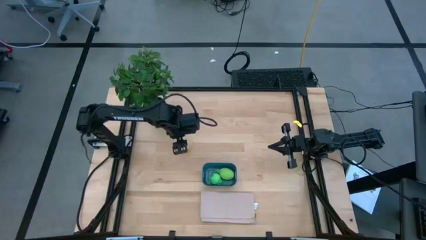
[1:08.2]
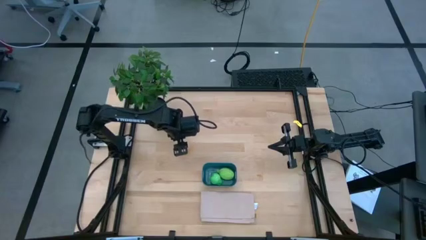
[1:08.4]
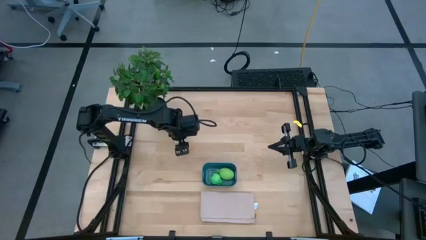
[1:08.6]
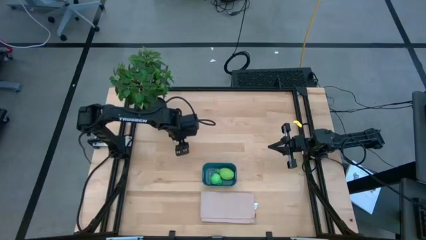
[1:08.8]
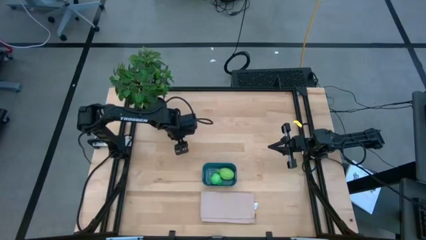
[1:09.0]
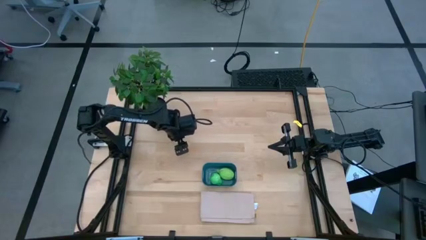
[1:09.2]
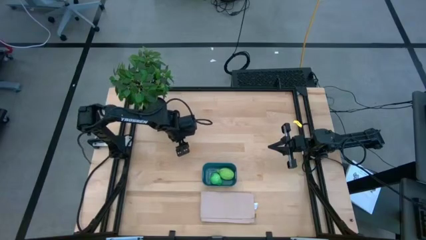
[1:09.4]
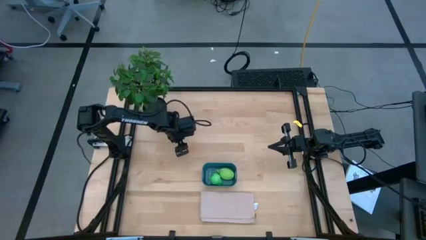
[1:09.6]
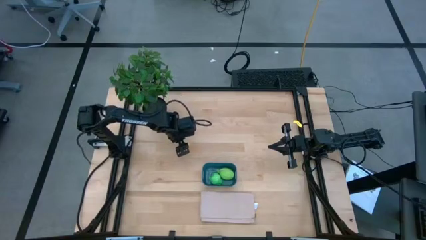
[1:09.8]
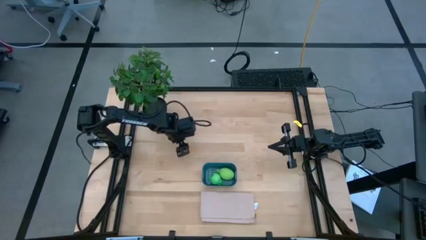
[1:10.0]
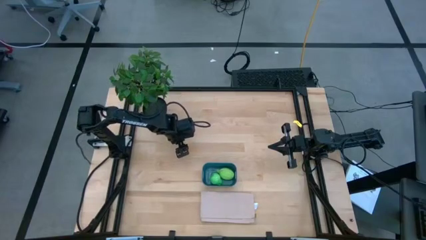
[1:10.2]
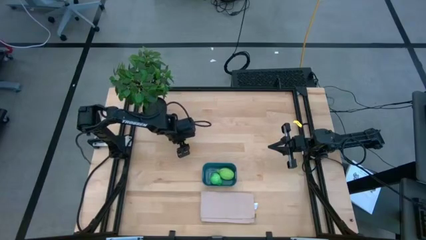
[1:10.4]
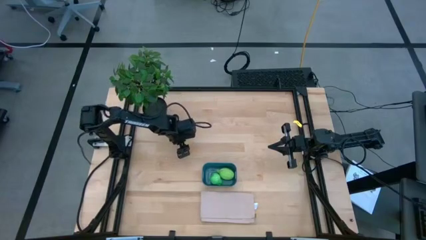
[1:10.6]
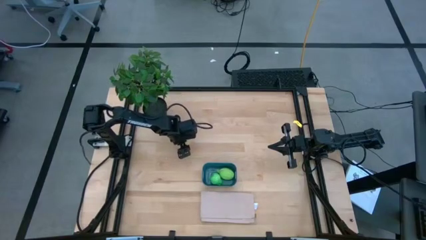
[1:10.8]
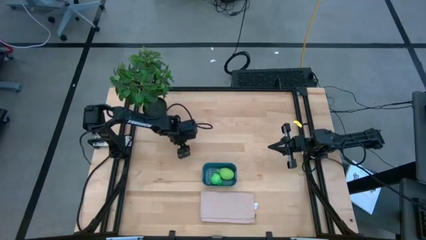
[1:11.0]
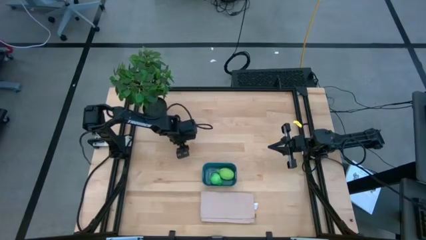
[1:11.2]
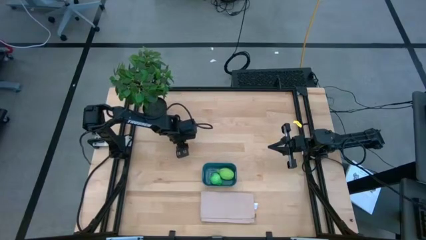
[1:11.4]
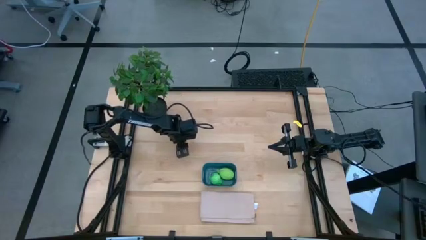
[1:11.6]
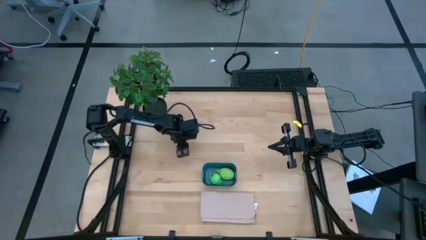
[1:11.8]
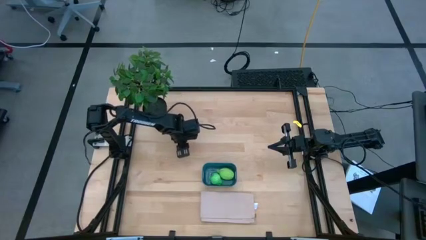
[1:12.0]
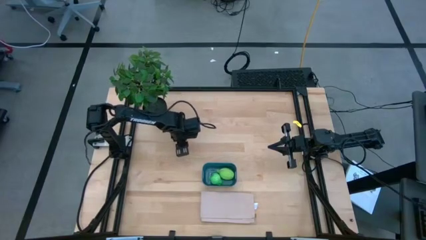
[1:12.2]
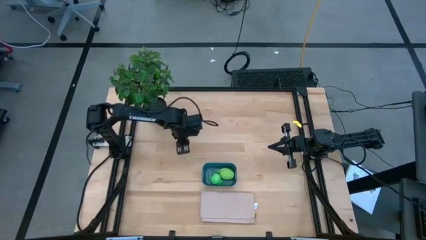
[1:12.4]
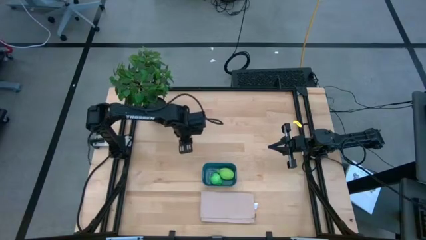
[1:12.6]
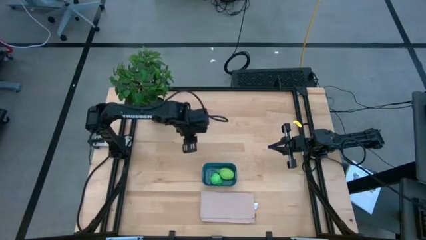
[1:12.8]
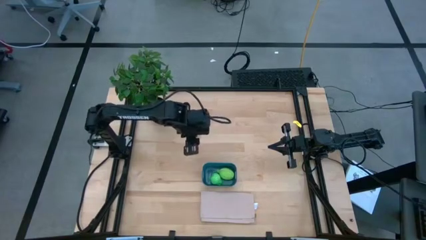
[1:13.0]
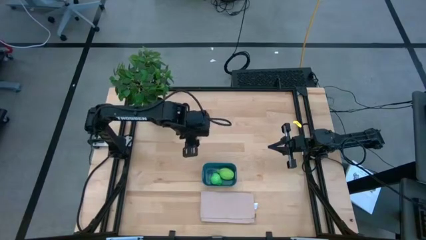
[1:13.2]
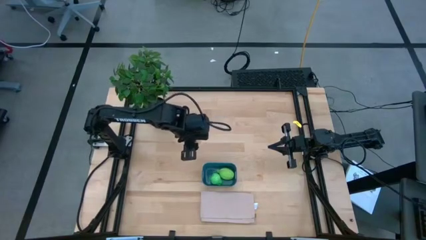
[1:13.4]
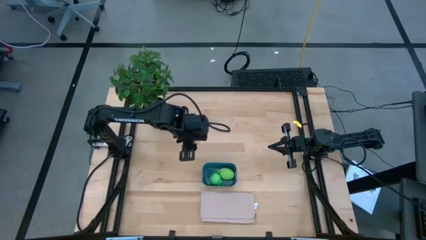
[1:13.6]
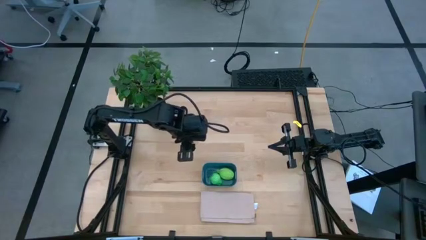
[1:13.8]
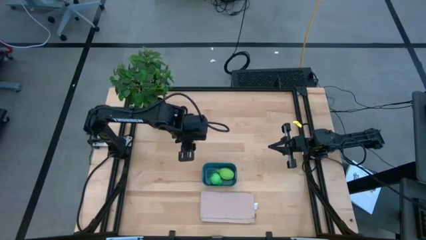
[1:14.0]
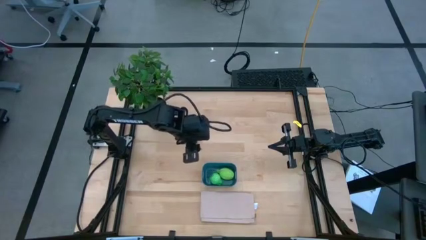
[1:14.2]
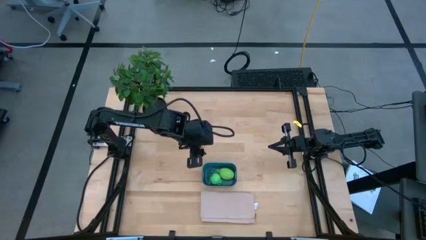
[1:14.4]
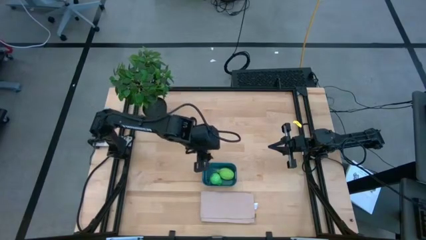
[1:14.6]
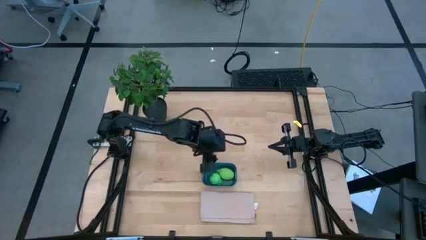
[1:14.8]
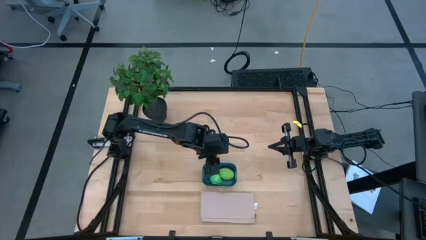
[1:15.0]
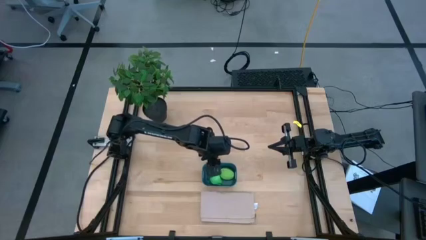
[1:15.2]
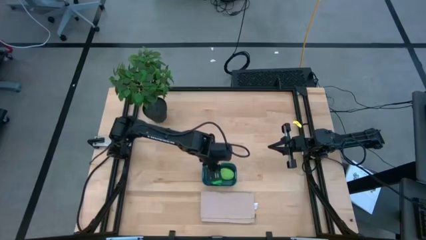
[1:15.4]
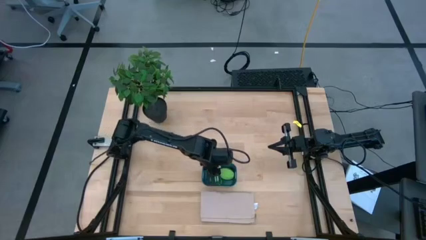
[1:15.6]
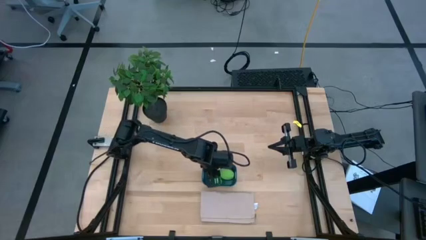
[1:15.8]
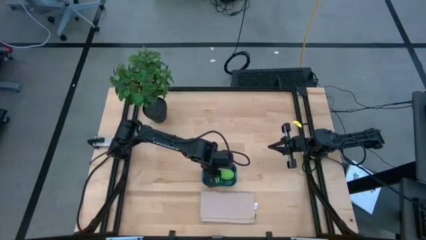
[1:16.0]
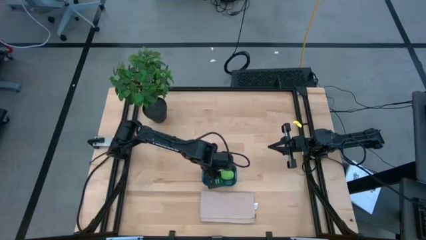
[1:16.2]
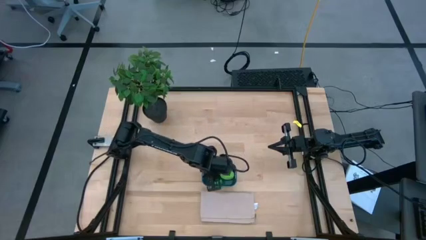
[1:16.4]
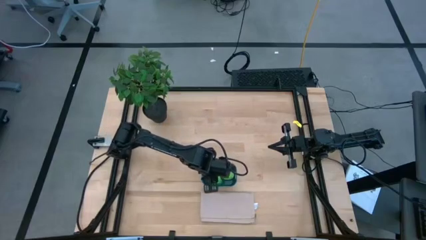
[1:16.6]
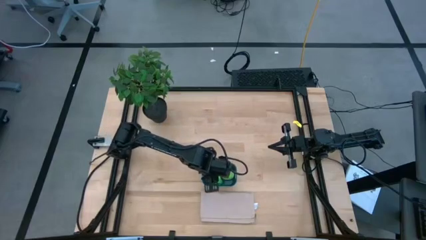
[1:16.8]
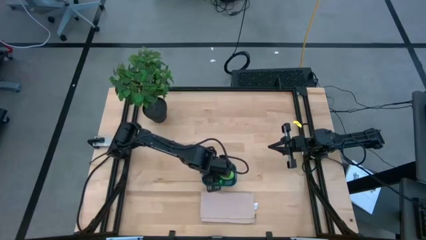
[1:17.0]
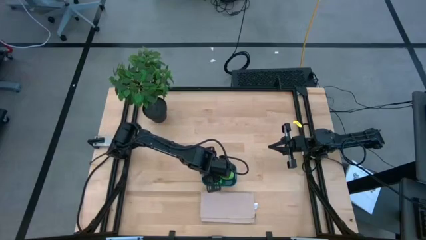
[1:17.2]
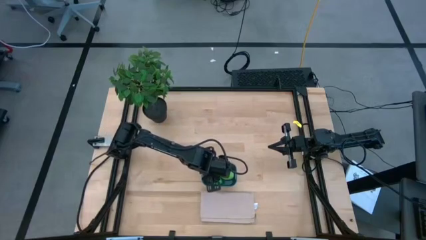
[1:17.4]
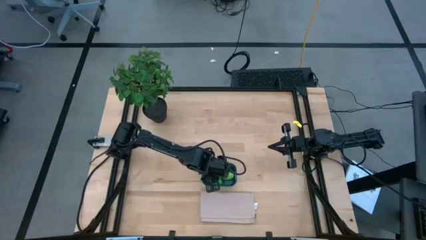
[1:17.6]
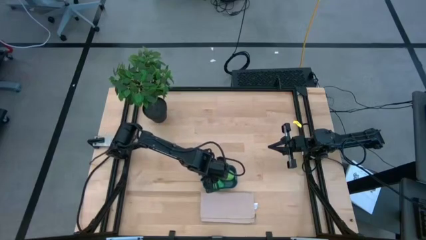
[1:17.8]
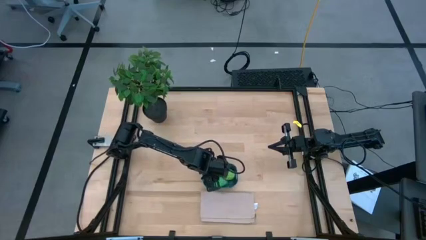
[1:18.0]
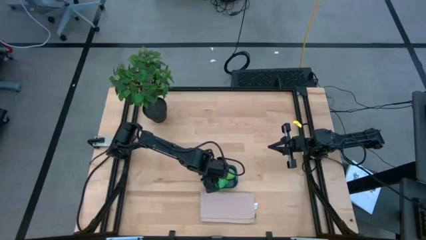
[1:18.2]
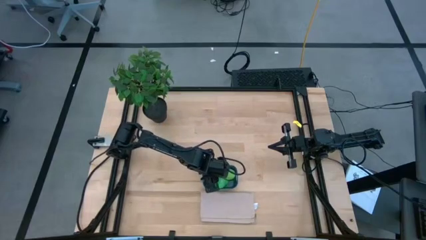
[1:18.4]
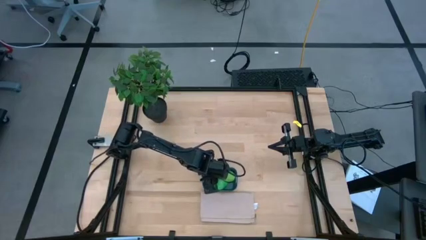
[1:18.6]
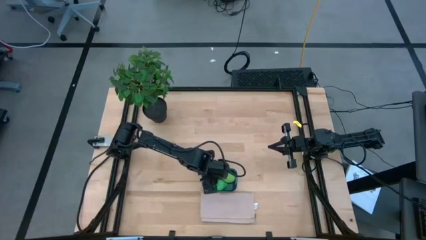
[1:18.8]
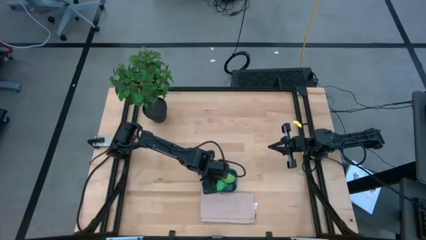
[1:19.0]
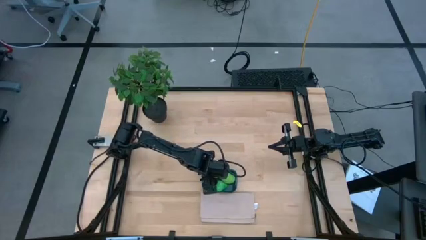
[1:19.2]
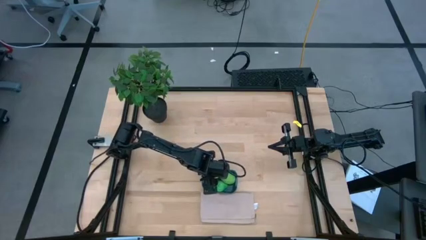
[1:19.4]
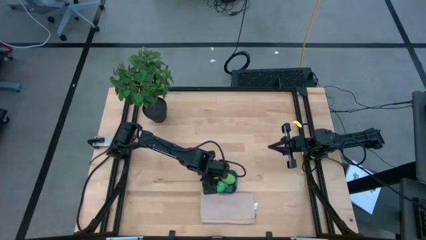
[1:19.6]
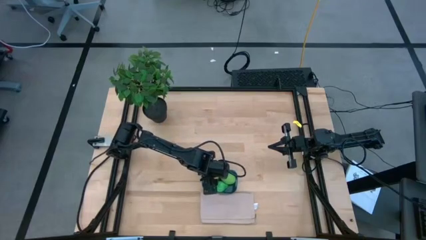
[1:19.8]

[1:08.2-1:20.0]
Task: Pick and placing Produce into tupperware
Put the brown potato into the blue bin

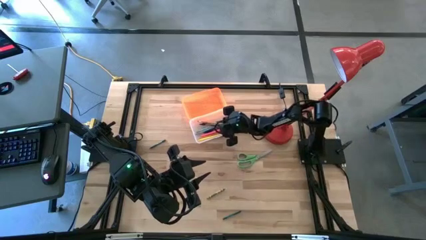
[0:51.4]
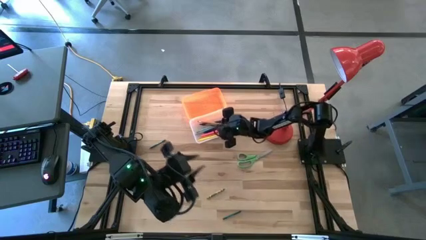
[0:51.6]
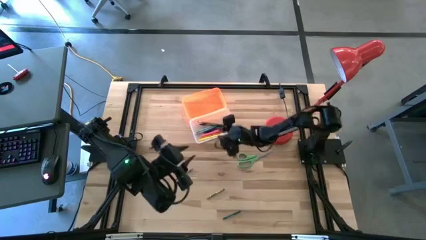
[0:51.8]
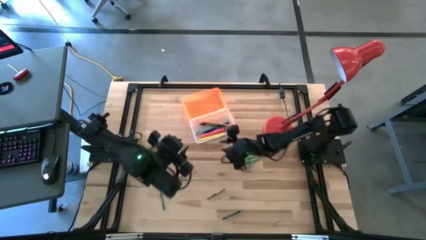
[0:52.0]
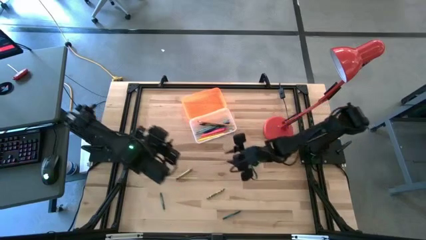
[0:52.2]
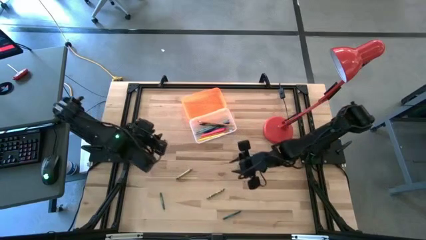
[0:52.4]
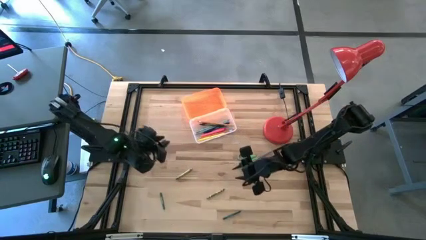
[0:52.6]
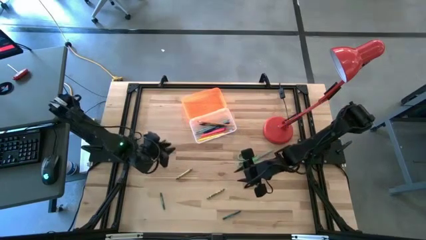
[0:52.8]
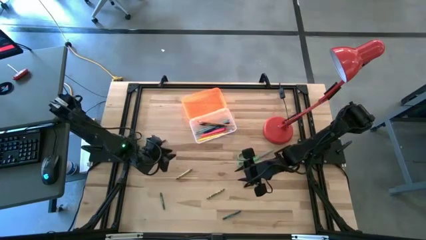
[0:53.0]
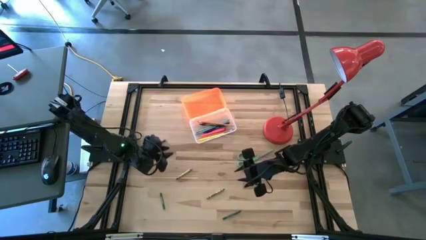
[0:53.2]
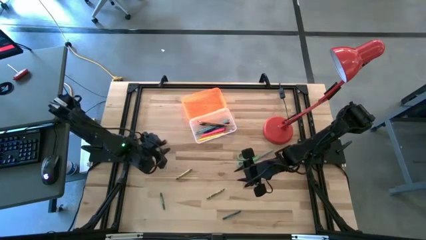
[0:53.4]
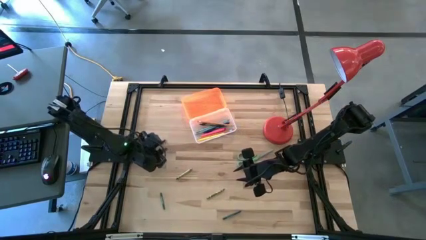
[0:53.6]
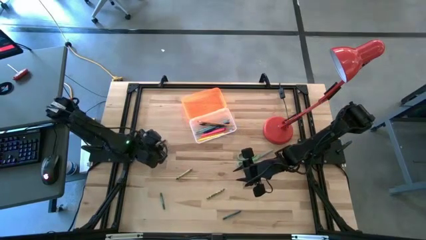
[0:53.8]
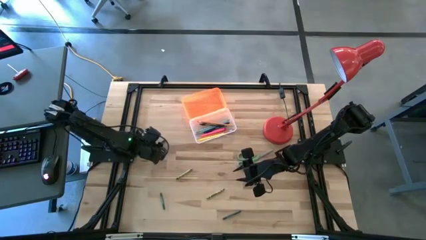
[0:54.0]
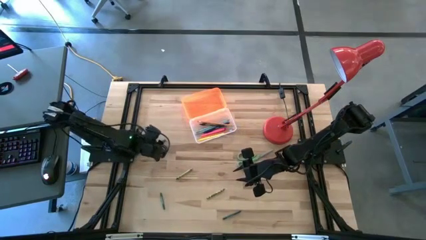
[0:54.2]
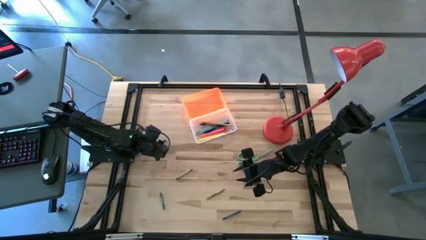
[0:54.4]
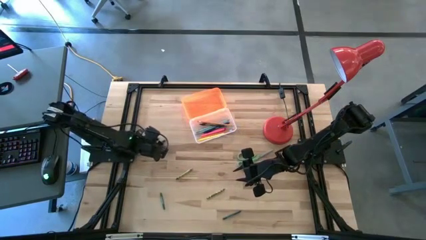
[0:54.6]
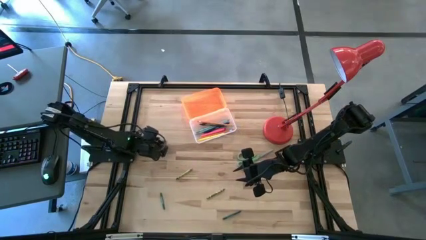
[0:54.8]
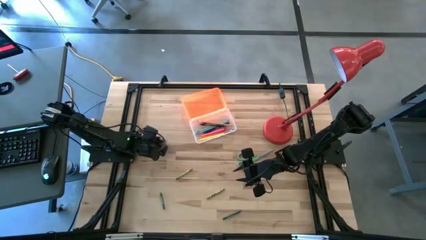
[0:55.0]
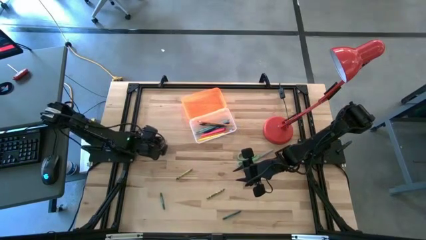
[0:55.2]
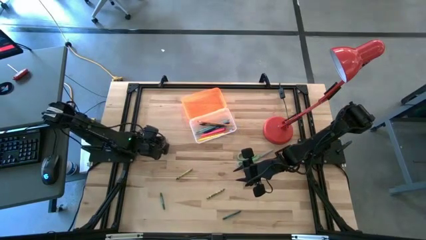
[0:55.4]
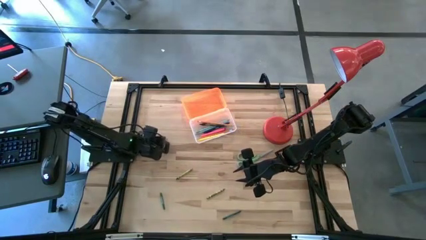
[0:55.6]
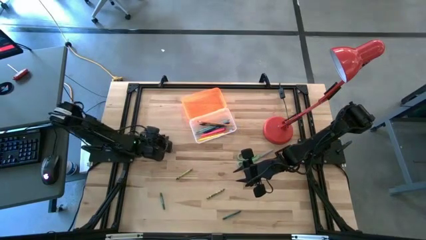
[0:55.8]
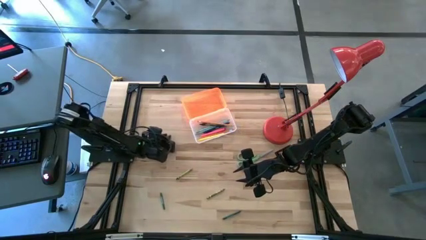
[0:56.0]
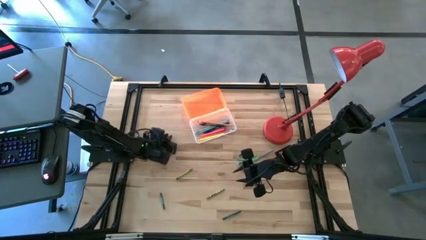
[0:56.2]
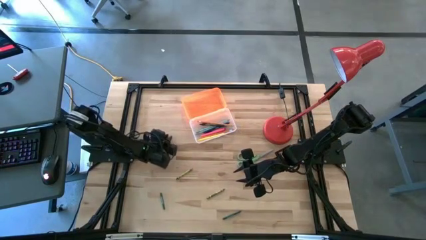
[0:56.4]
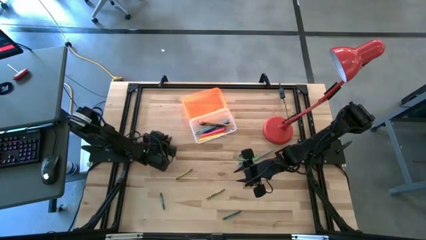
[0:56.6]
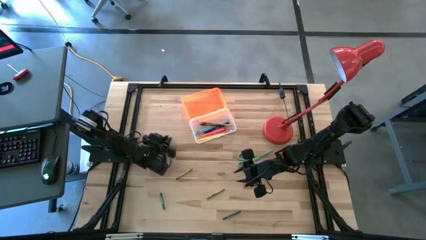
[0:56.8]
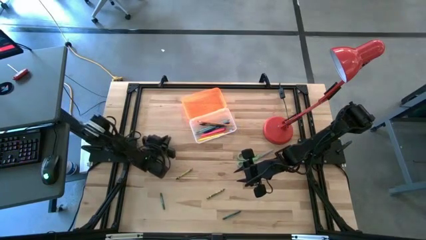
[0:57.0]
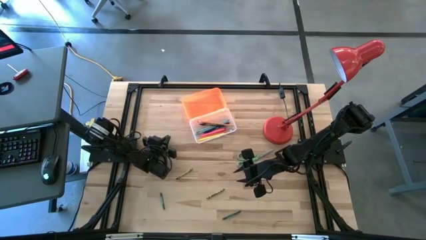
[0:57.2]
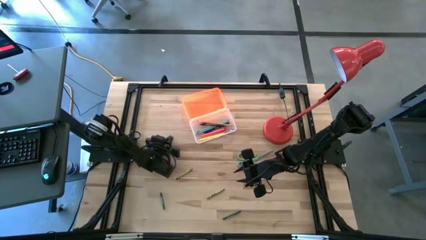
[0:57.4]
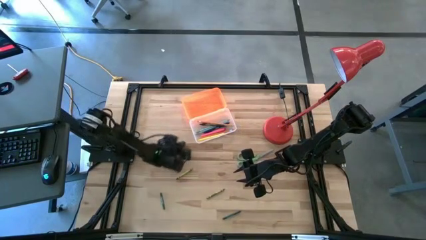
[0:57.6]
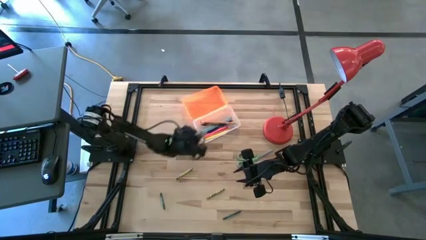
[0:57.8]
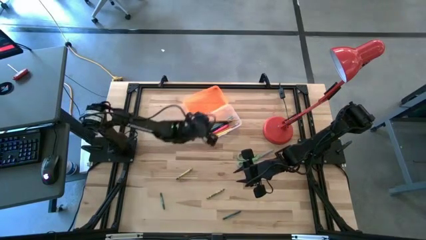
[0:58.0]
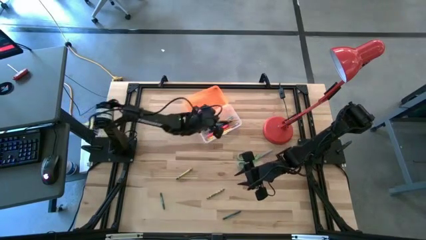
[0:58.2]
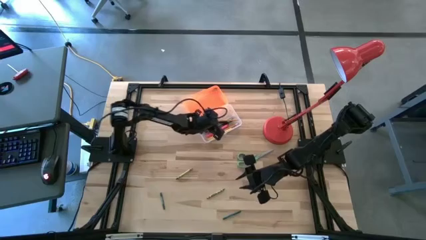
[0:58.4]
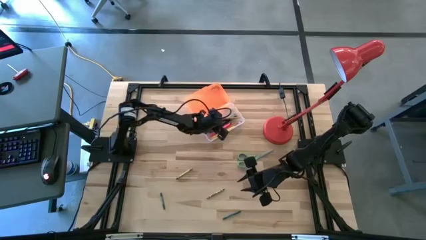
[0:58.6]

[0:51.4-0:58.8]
Task: Pick & place school supplies into a supply box
Put the dark green crayon into the orange supply box
